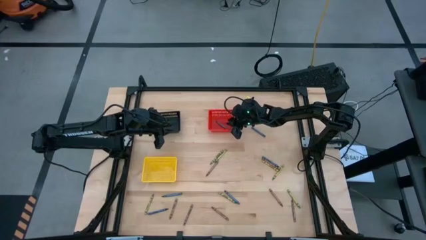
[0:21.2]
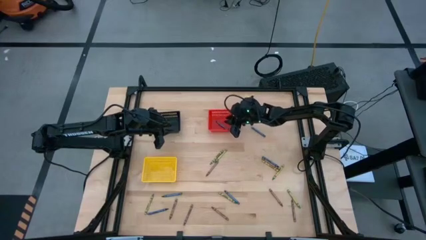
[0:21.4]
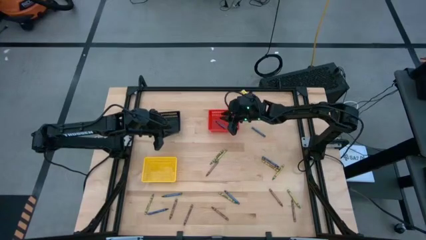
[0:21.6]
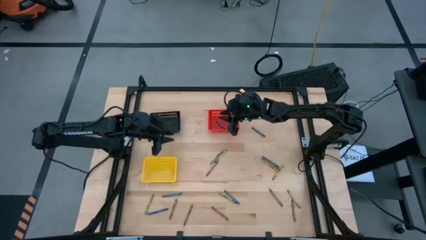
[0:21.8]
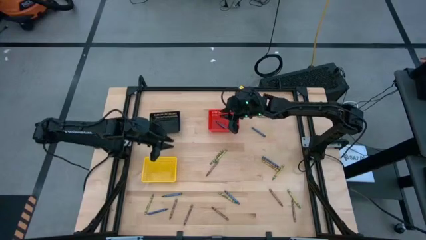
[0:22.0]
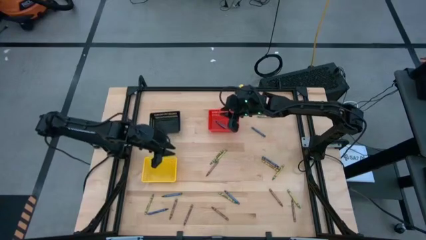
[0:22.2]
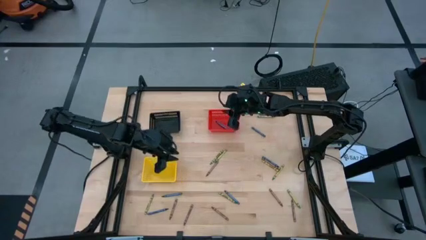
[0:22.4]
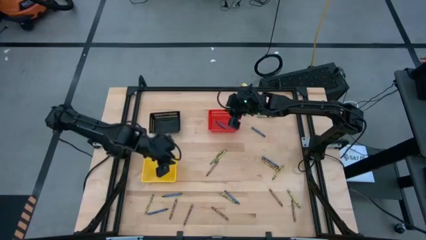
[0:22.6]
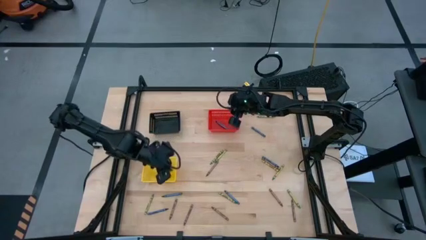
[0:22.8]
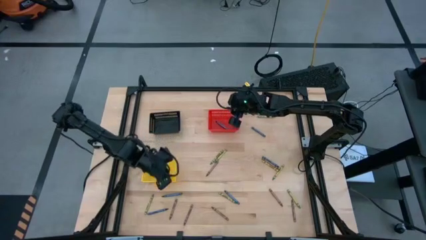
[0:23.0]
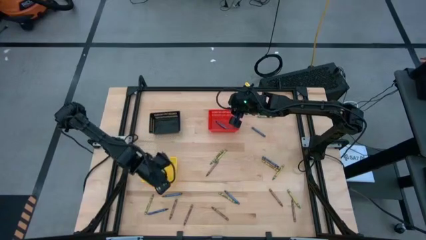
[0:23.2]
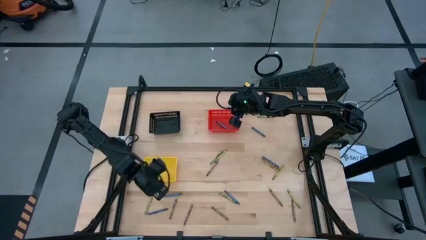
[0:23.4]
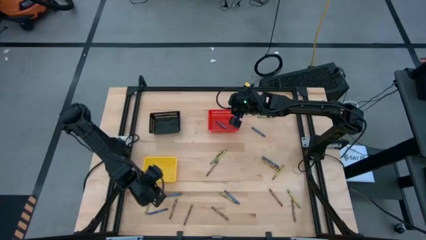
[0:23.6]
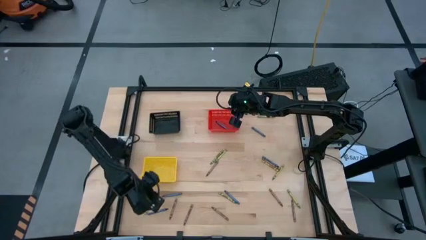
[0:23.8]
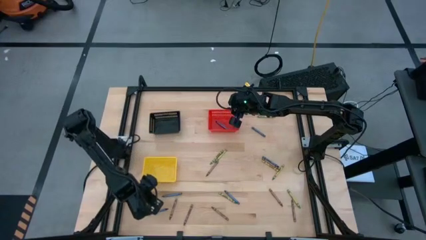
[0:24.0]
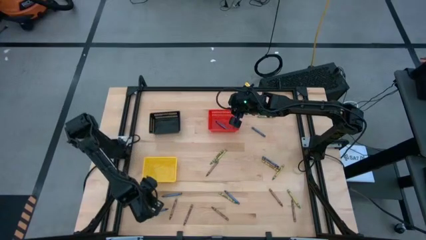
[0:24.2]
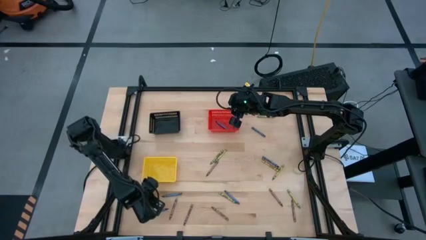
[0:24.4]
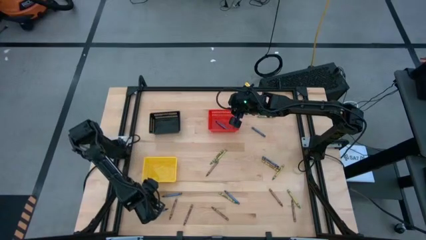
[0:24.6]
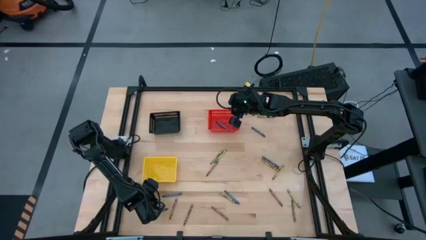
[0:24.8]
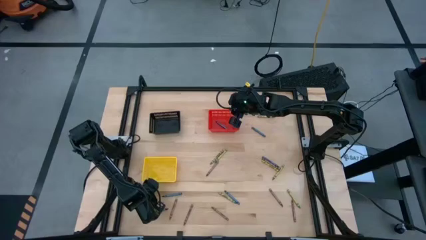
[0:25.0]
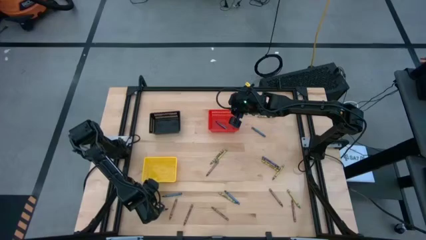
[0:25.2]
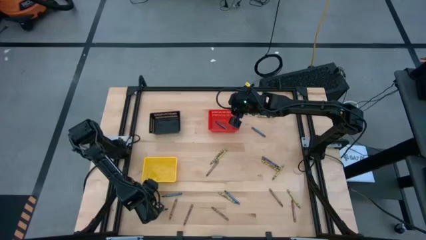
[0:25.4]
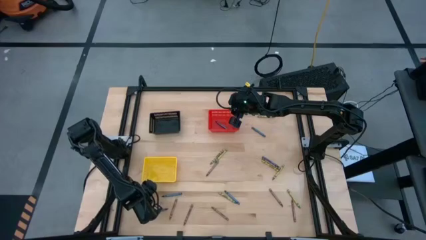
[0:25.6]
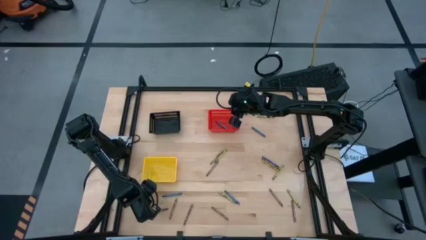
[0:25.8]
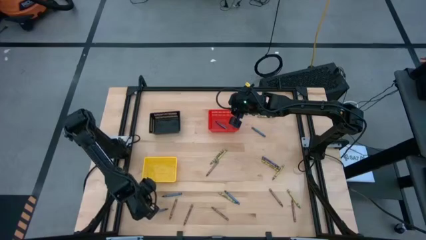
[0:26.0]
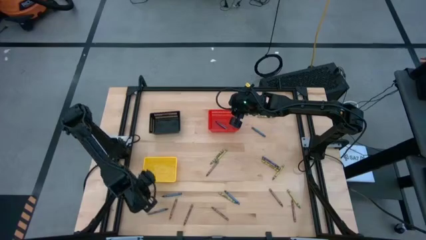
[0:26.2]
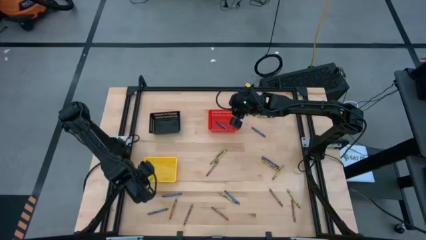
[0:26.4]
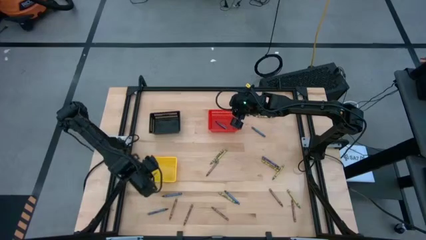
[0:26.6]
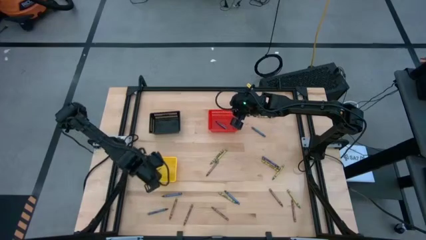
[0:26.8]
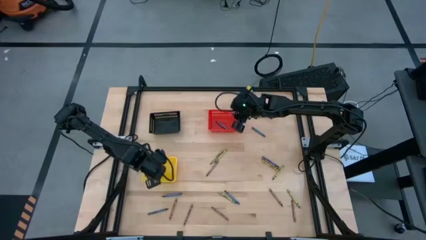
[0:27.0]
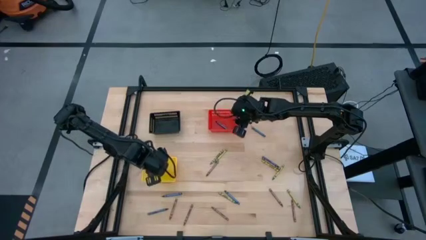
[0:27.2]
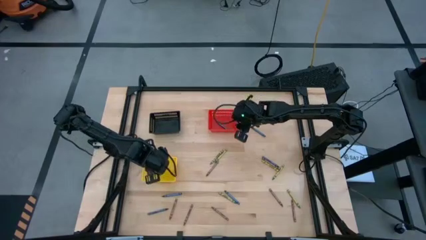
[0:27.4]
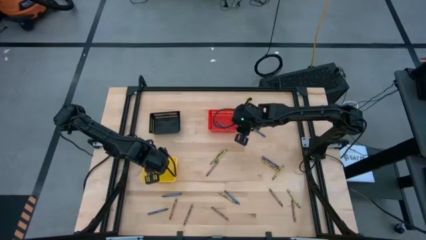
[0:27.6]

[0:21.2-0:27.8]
Task: Sort crayons
Put the green crayon into the yellow bin

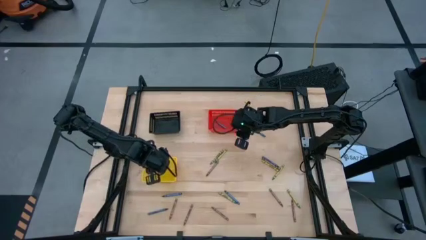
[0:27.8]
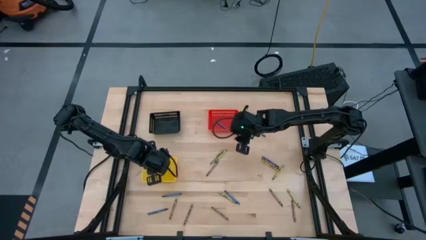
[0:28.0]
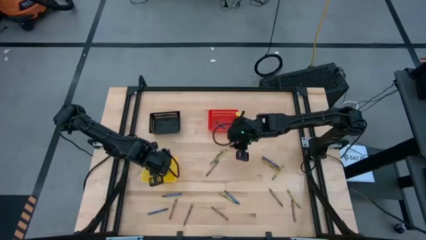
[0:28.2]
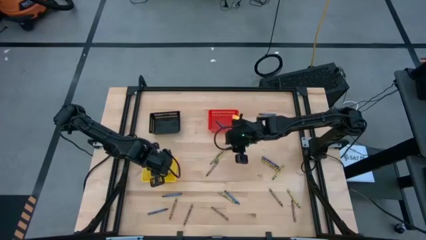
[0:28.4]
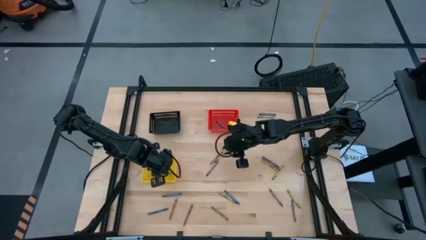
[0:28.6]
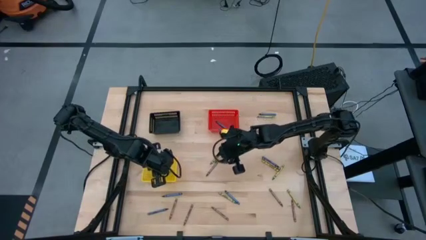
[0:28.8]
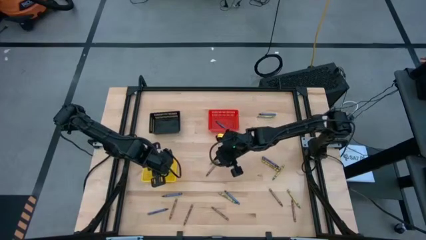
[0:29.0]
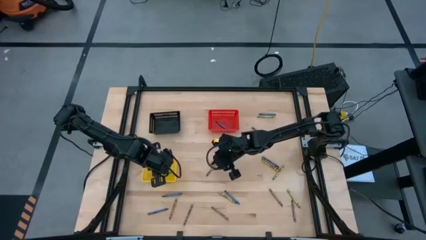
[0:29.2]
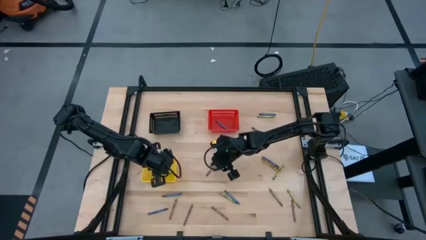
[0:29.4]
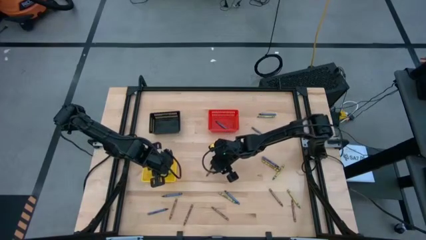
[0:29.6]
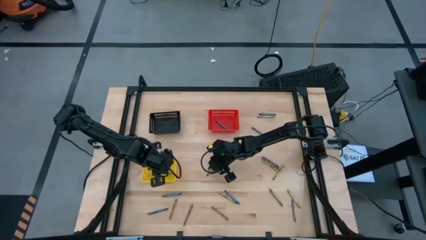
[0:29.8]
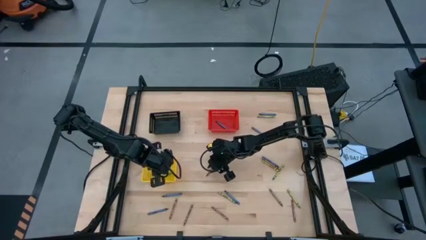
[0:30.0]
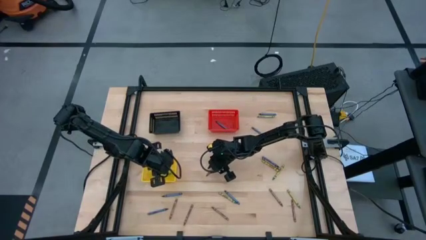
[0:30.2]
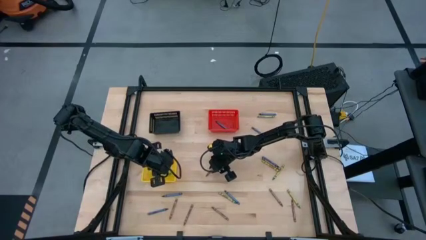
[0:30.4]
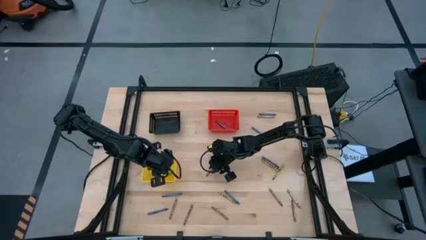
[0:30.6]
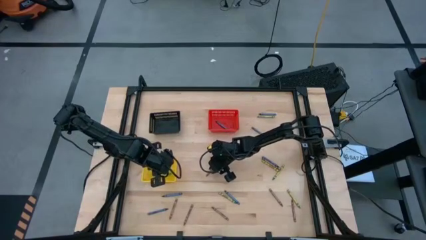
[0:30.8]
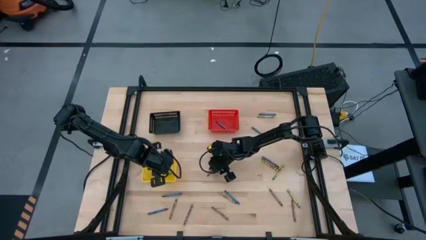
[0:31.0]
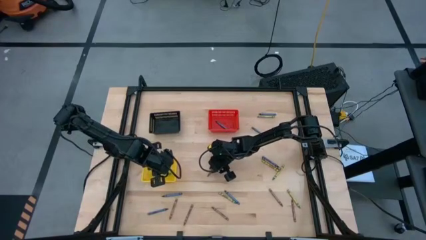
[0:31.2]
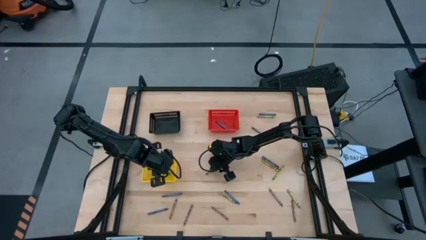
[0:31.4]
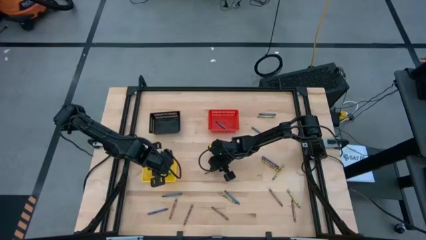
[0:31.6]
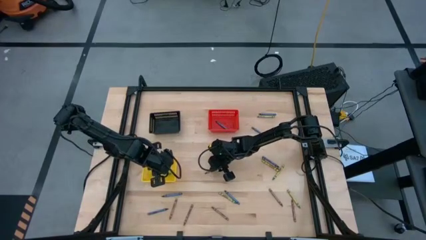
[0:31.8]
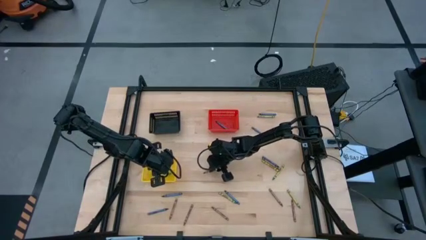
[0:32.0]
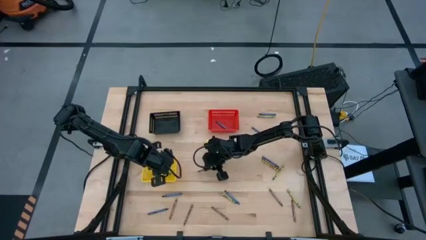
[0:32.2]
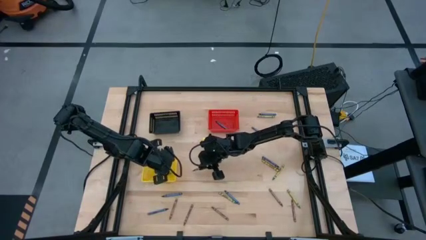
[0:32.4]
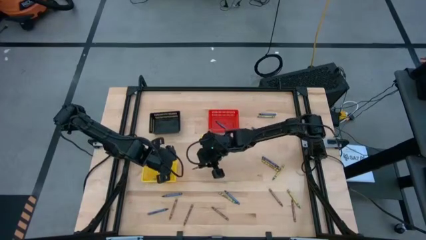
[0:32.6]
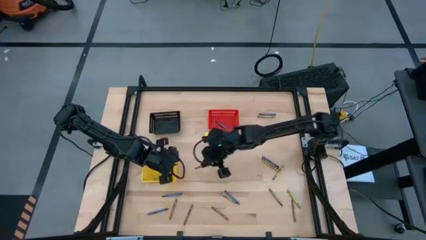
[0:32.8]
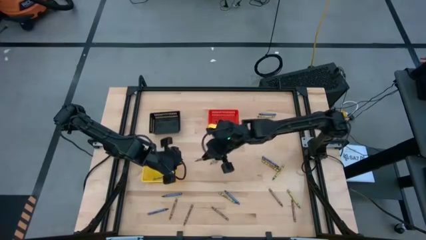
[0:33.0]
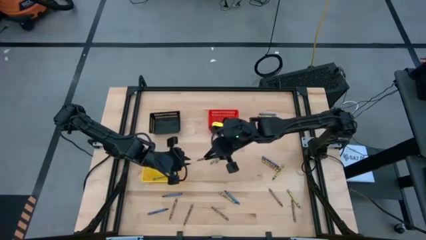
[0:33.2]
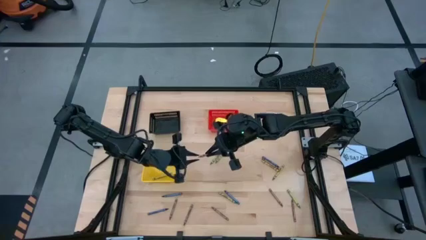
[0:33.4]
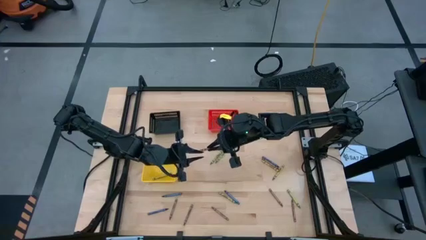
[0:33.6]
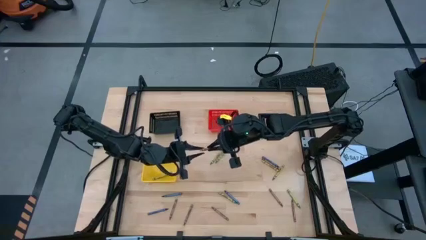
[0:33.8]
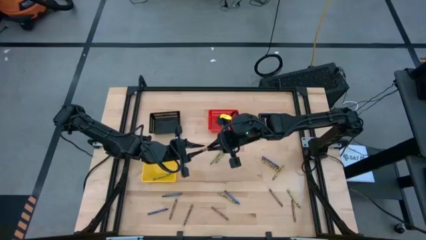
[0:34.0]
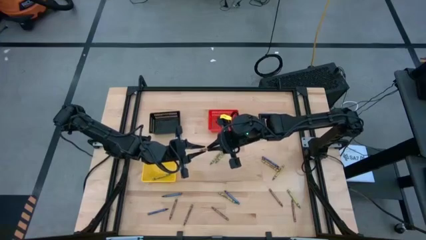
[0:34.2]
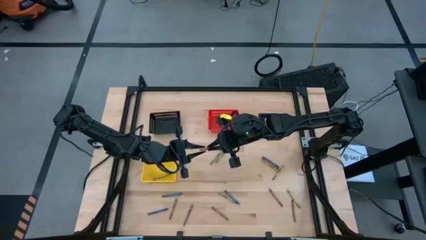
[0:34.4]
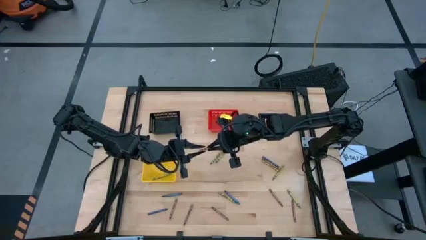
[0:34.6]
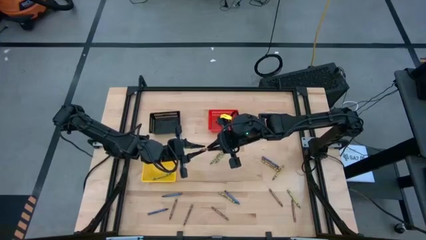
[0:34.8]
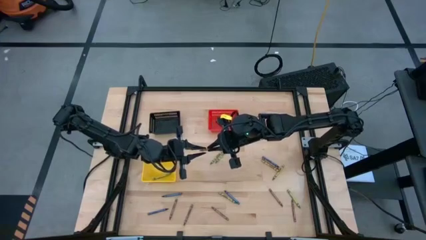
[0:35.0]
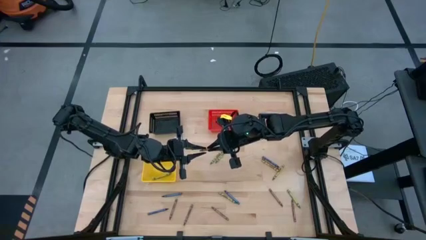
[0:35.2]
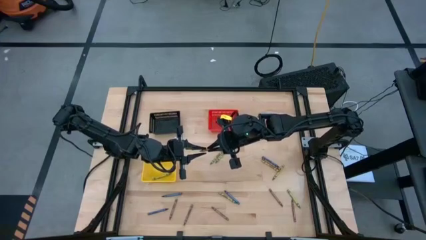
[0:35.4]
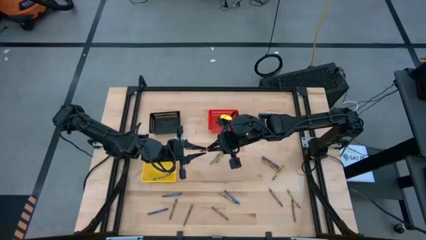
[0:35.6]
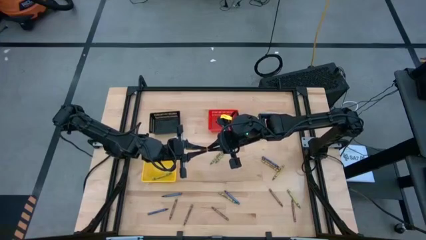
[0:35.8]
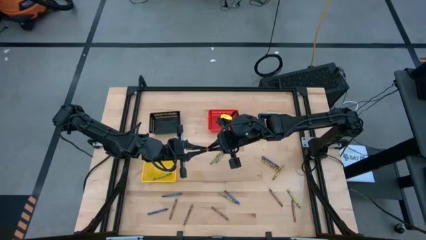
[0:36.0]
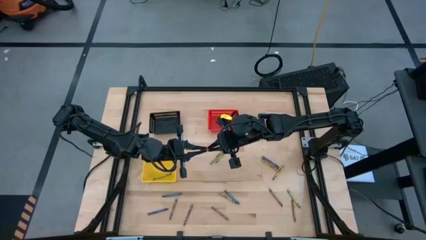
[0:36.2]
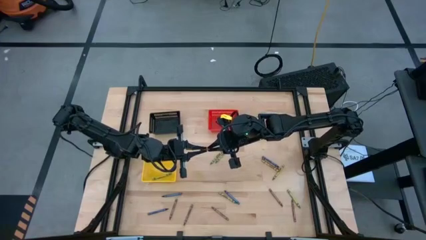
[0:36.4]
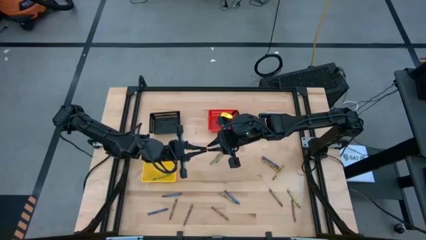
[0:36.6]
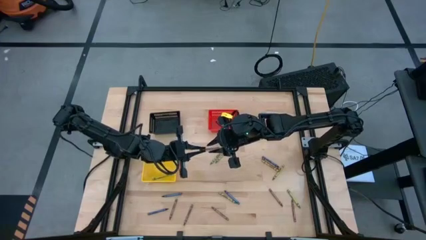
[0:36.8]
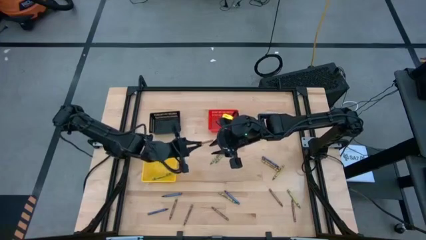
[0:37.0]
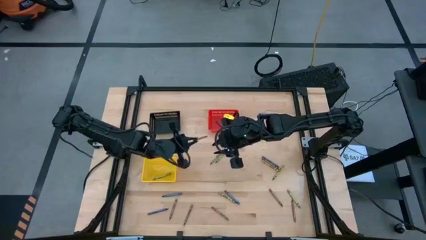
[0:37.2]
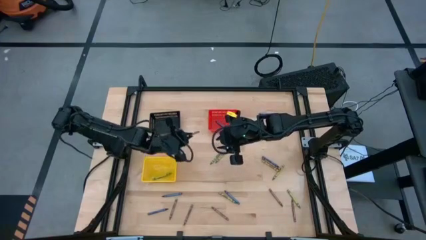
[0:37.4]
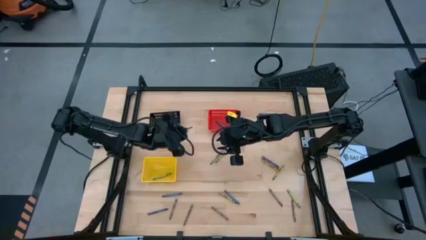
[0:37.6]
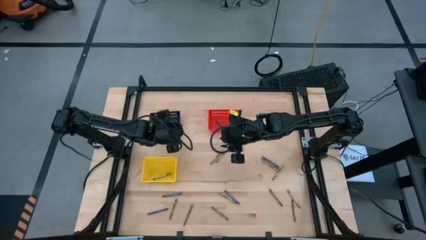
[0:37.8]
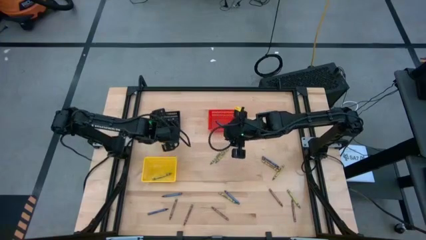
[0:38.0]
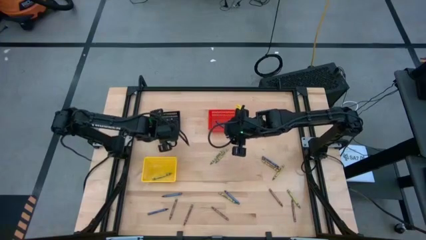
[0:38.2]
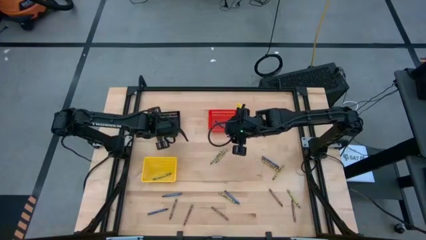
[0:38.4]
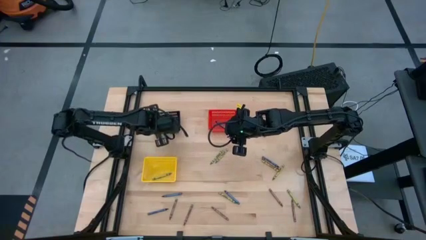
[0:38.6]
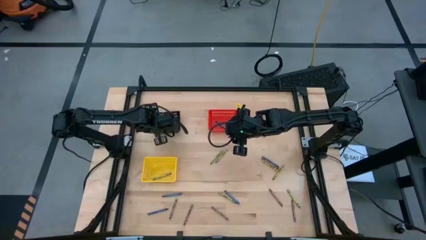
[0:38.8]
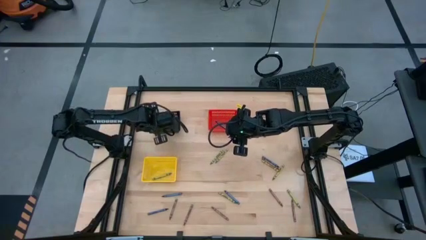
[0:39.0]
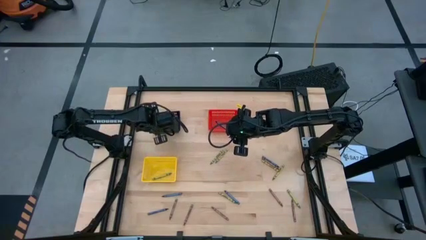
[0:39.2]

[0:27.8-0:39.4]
Put the brown crayon into the black bin
